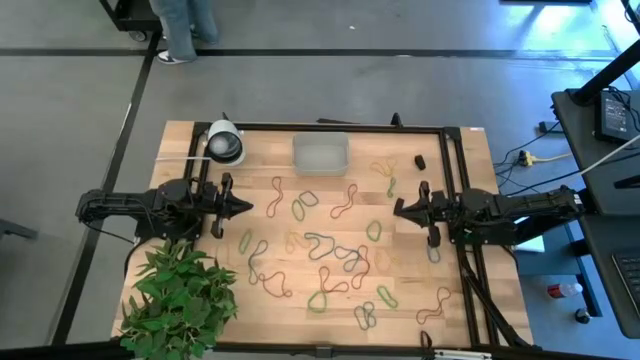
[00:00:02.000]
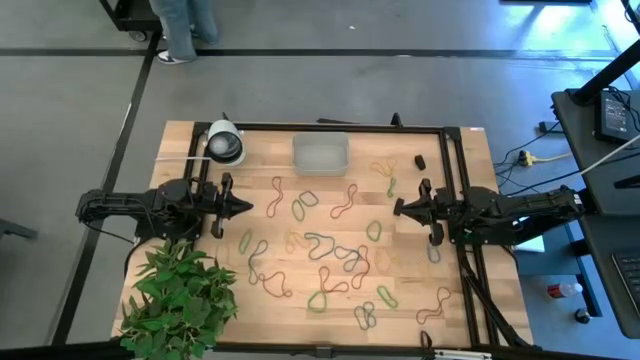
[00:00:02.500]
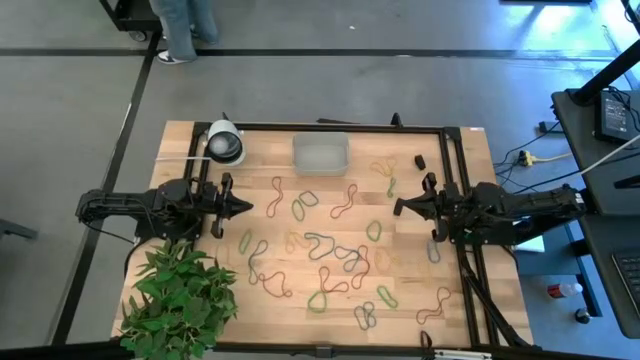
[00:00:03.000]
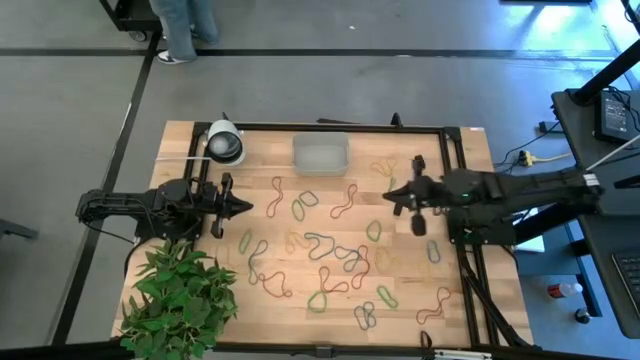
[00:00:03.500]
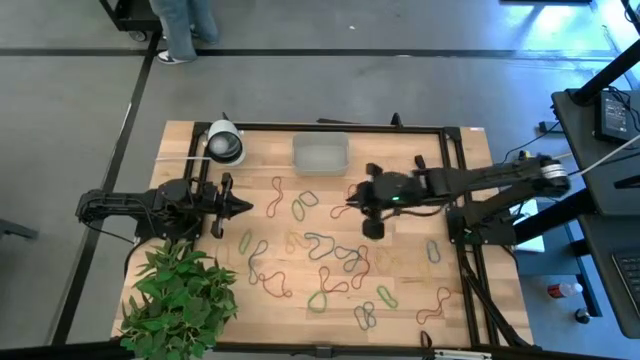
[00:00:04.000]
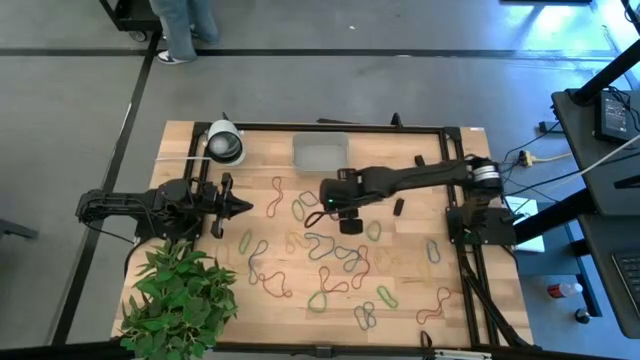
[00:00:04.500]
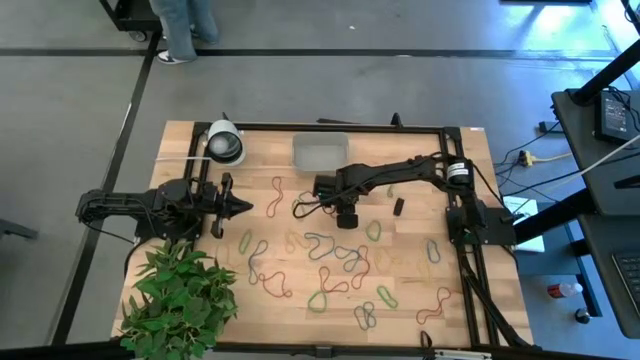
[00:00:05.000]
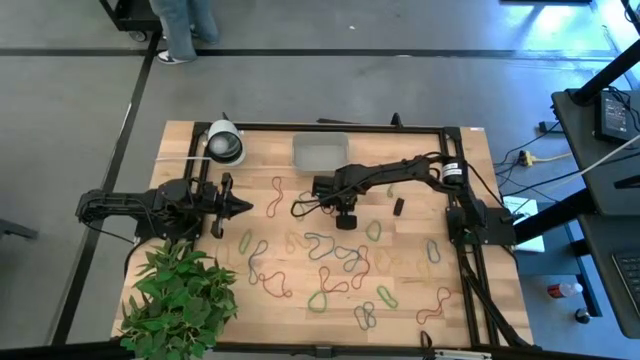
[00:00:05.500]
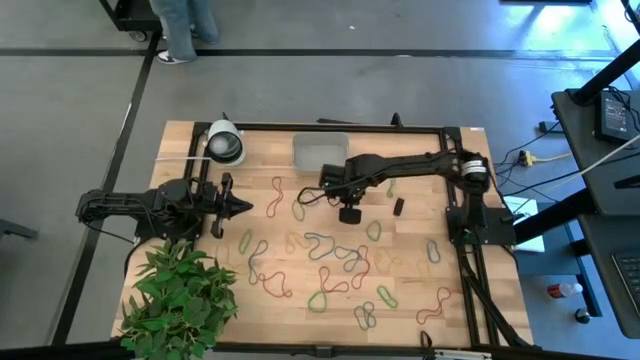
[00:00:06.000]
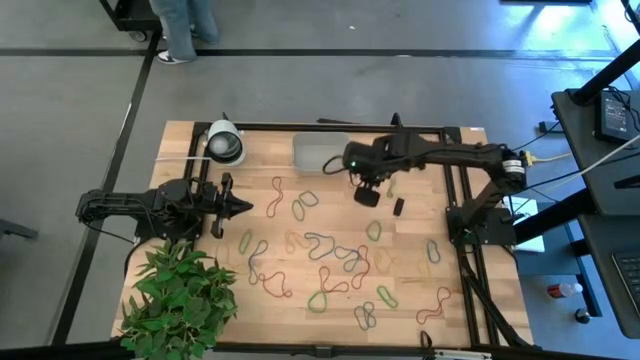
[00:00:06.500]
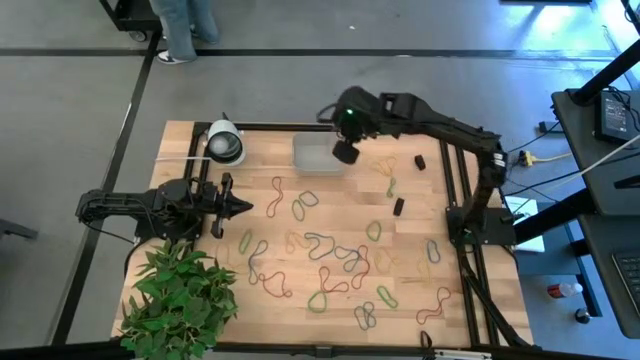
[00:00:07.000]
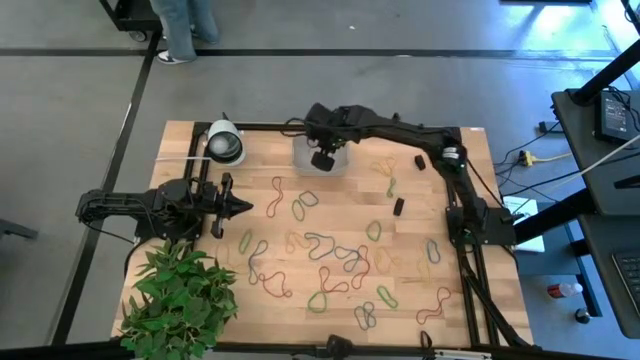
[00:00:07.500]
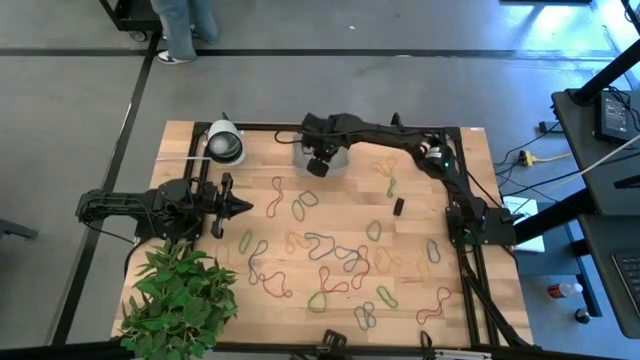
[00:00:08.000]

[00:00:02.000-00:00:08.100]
Task: Pick and place rubber bands into bin
Put the red rubber band into the white bin

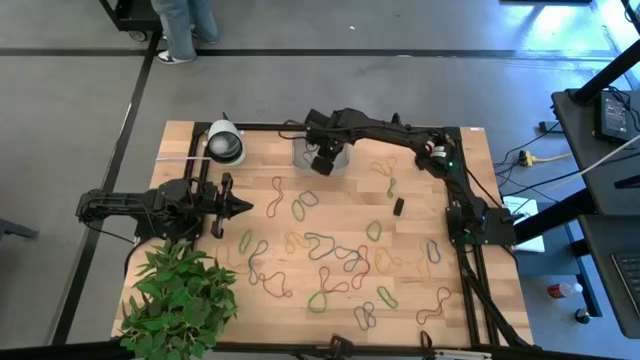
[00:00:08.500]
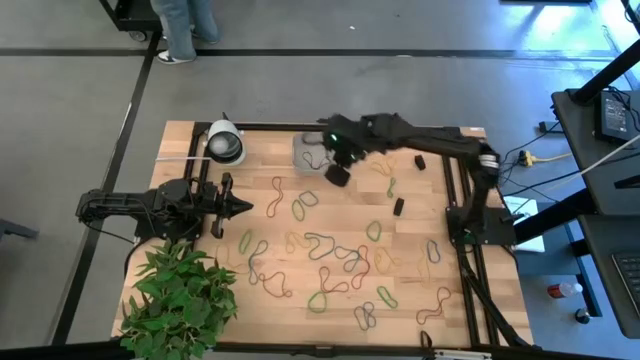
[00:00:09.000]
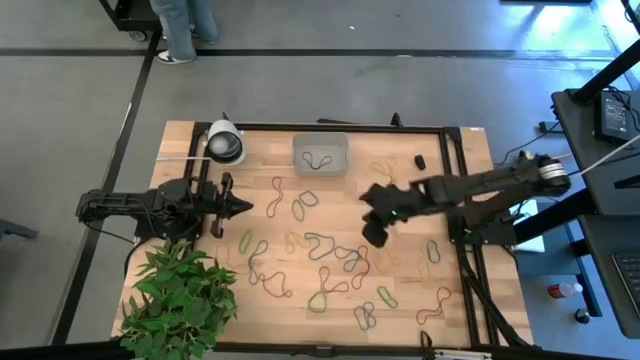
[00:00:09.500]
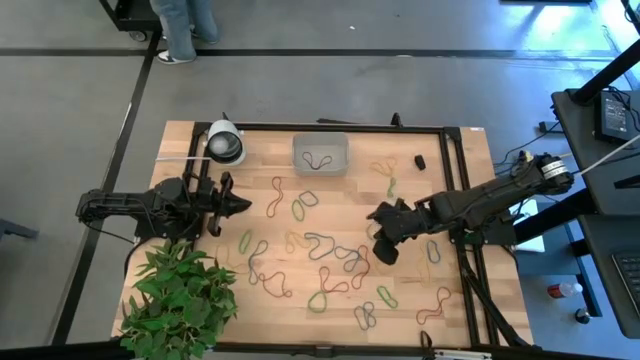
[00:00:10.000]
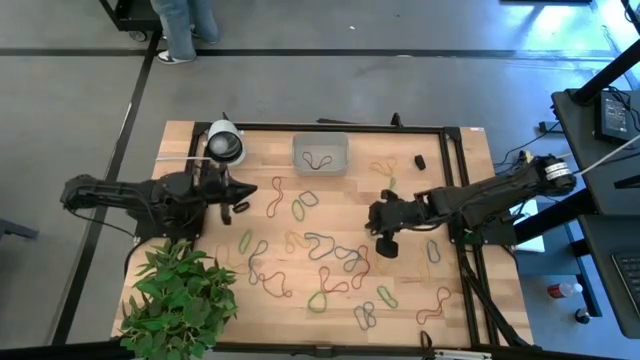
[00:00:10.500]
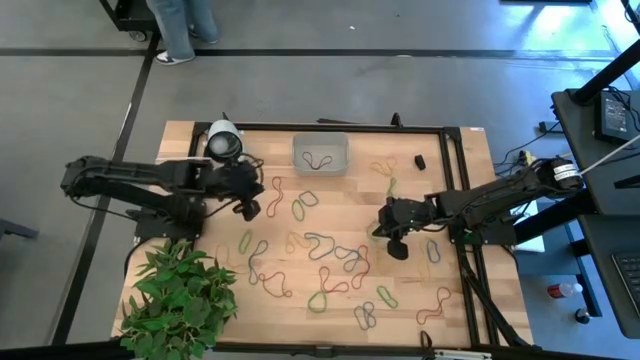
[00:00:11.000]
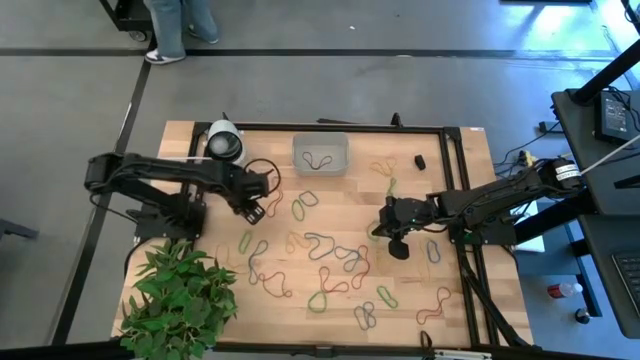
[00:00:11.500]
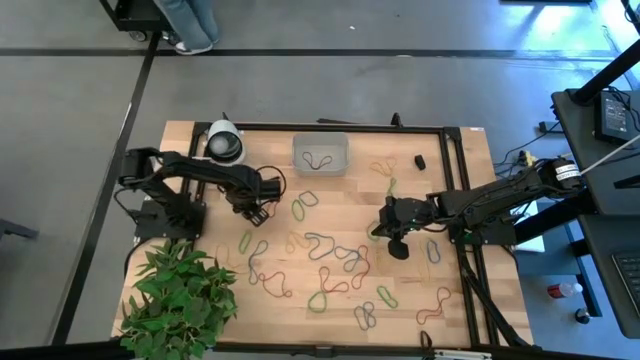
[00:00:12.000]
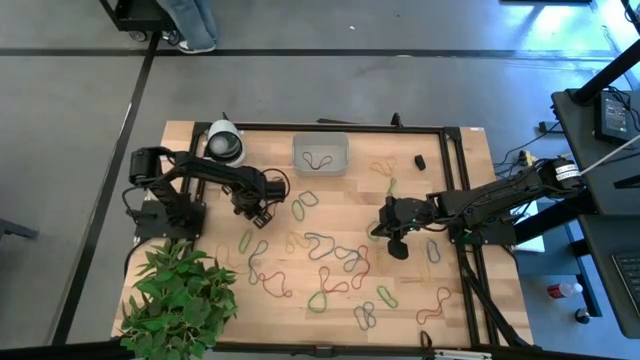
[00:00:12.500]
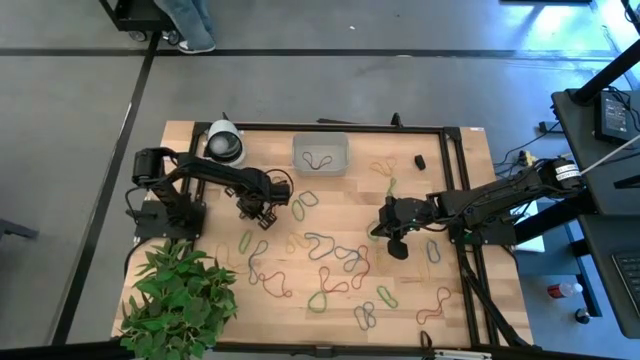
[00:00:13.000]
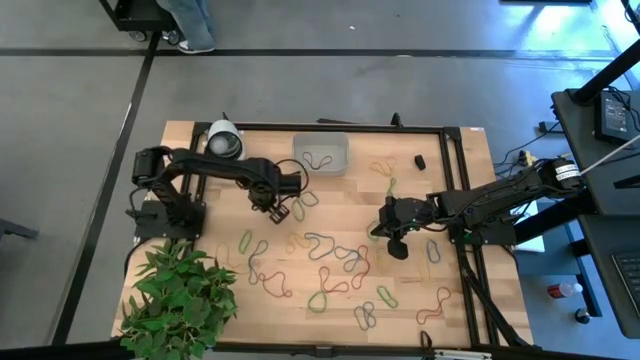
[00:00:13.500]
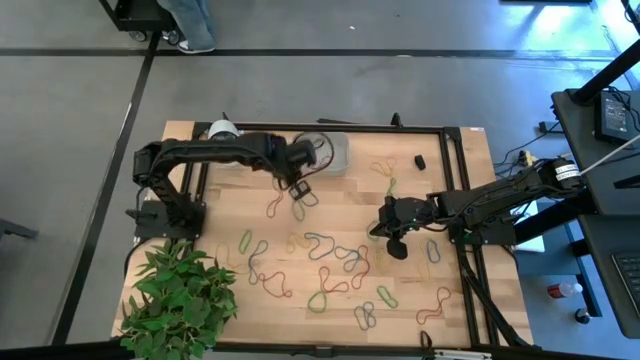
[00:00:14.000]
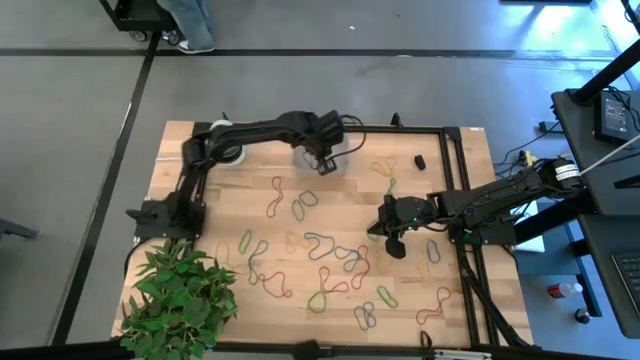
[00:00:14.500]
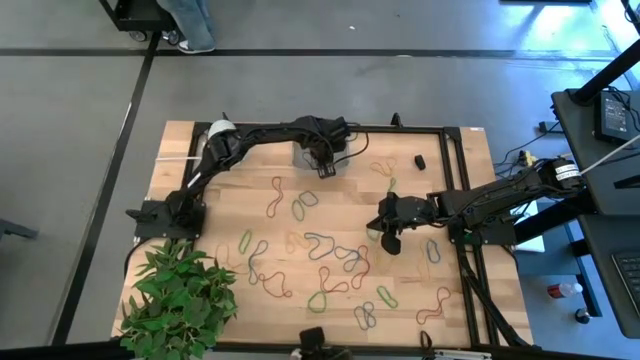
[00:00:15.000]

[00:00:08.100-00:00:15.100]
Put the black rubber band into the white bin

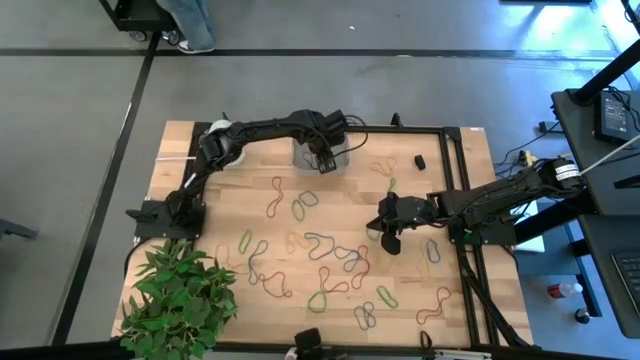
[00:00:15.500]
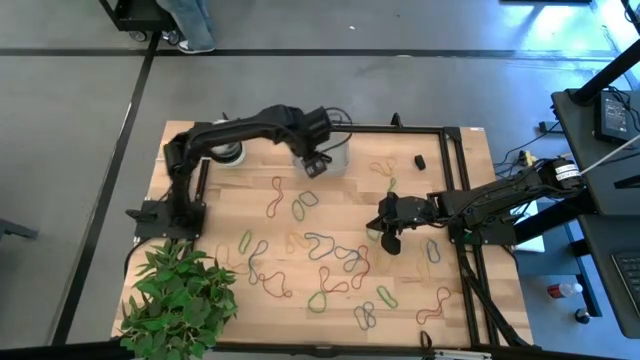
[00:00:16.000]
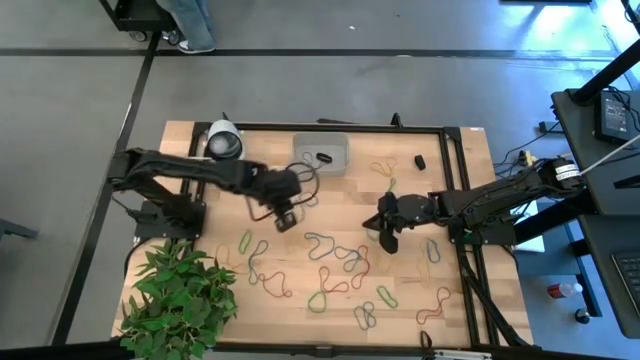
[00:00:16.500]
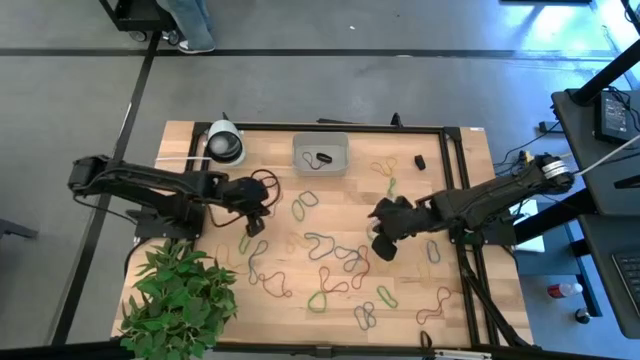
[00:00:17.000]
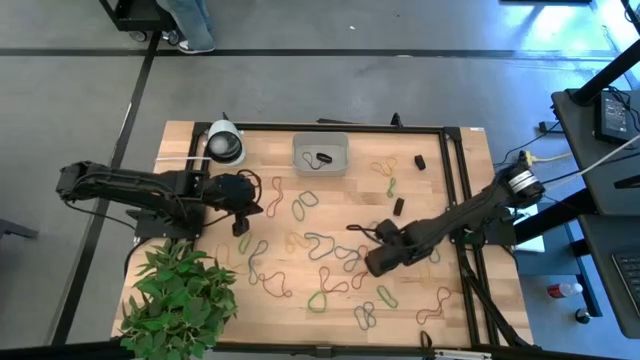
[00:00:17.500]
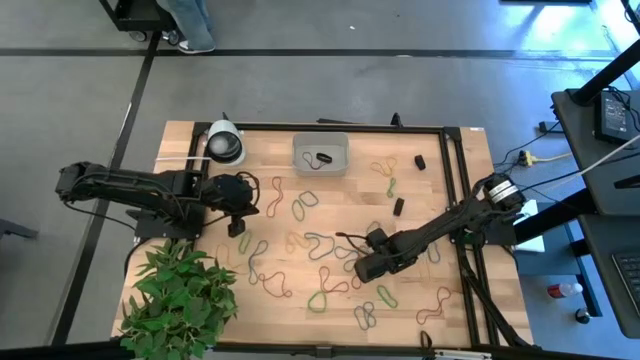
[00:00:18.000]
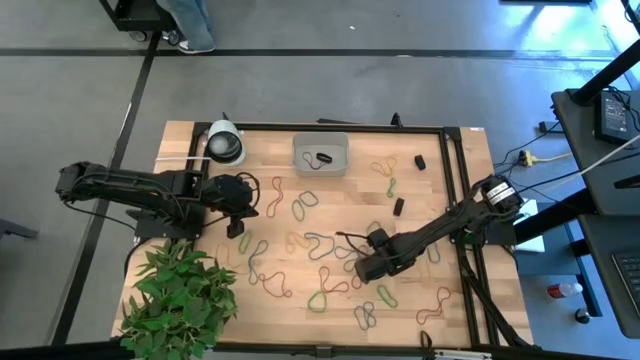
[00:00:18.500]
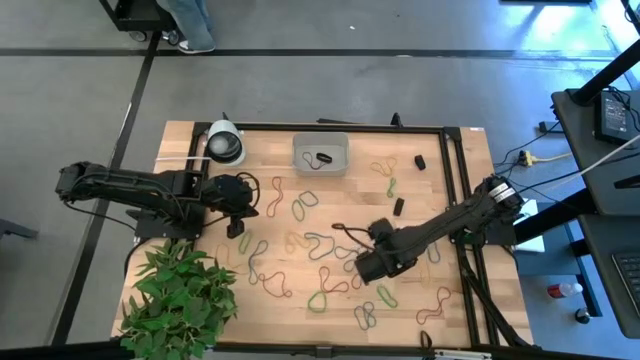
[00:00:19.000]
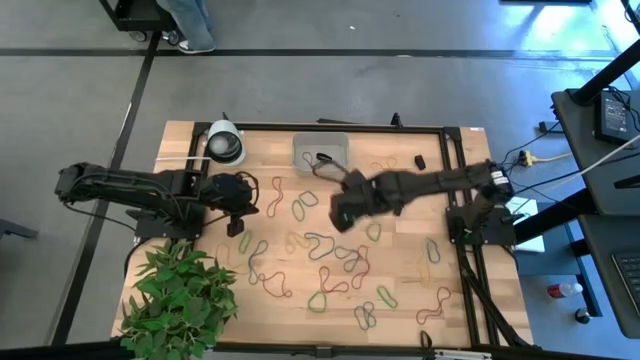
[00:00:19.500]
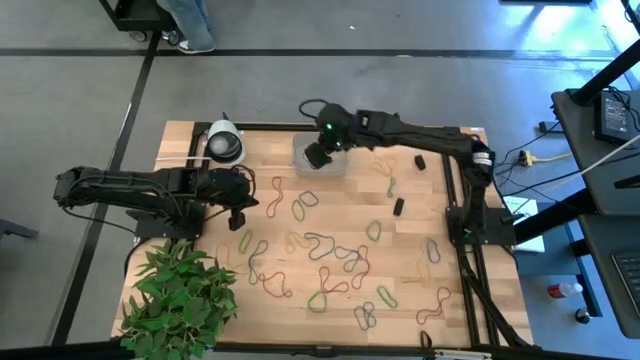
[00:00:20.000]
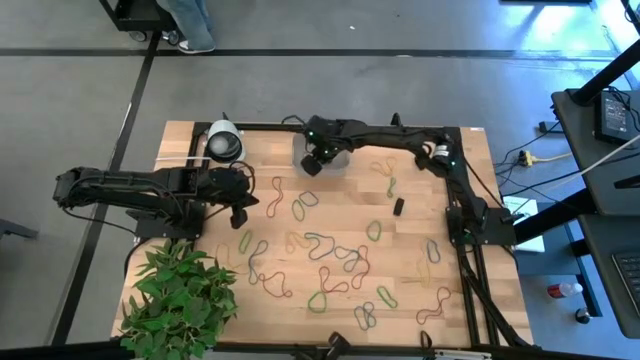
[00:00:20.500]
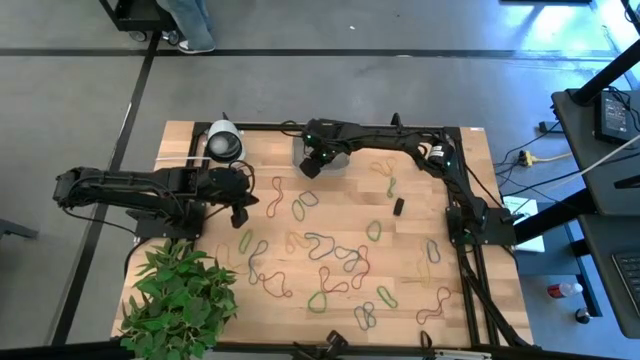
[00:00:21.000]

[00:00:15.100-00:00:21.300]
Put the yellow rubber band into the white bin

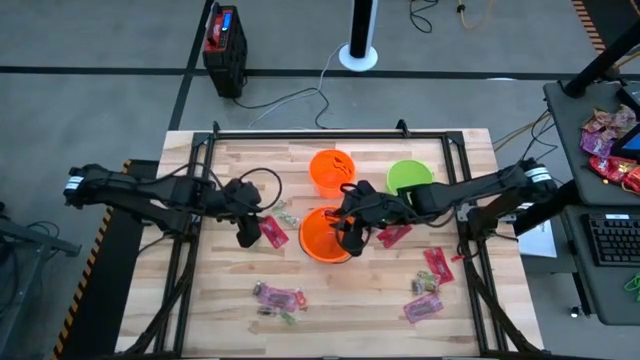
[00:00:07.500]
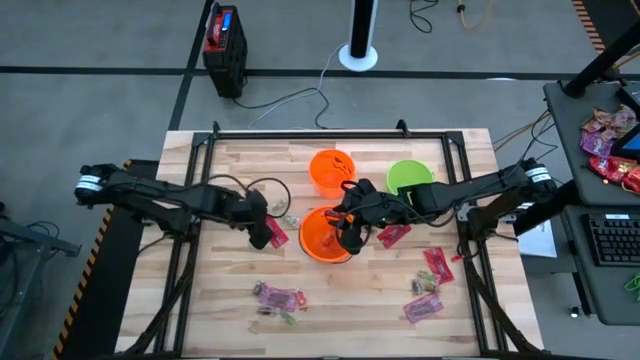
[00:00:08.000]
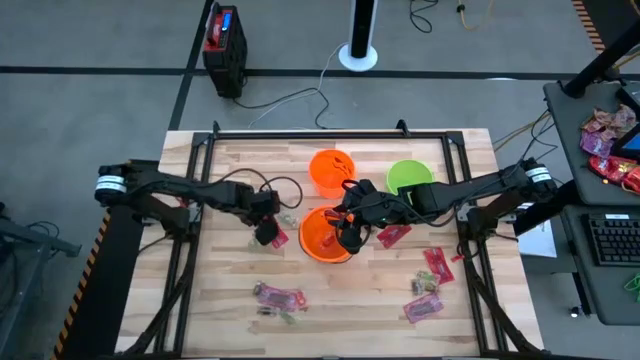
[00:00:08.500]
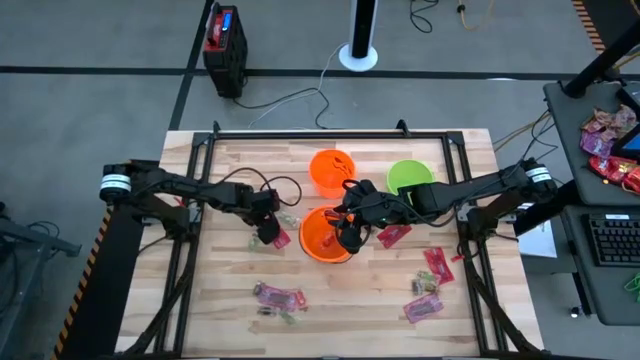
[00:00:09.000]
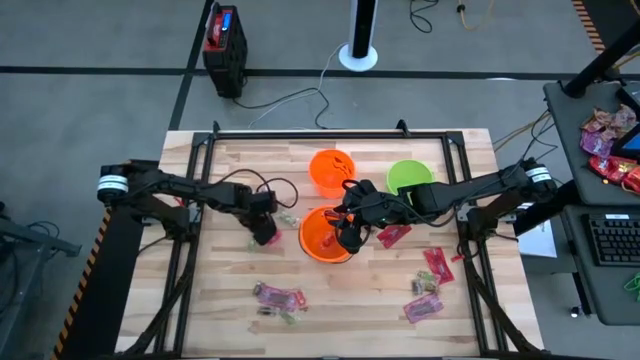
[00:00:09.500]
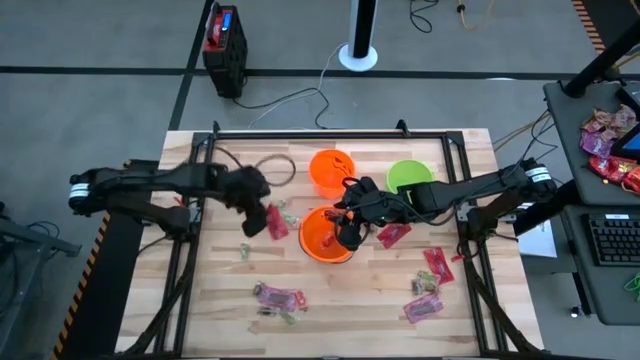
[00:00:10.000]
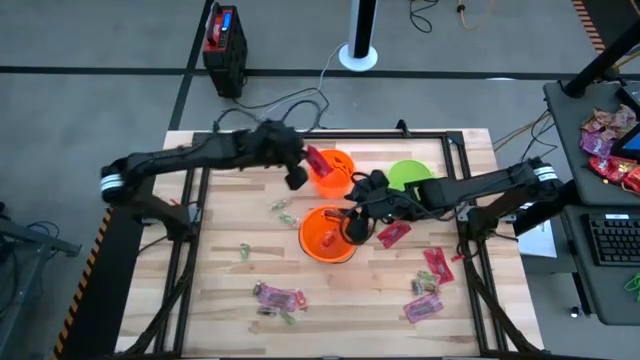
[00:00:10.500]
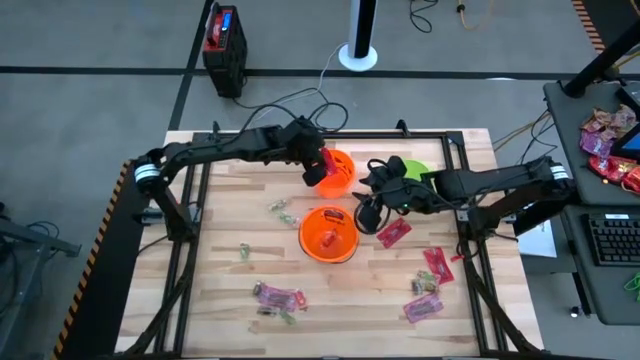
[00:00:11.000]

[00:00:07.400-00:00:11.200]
Task: Sort candy by brand, put in halloween buckets
Put the top left red candy into the top orange bin
